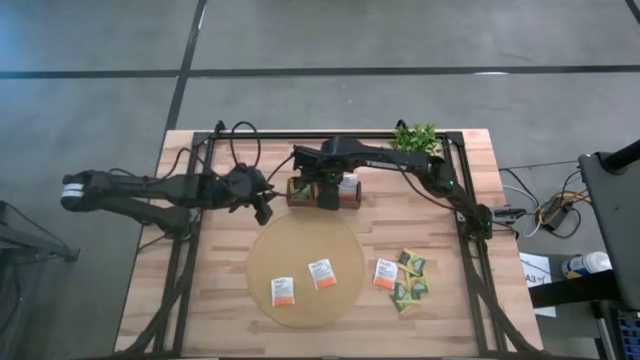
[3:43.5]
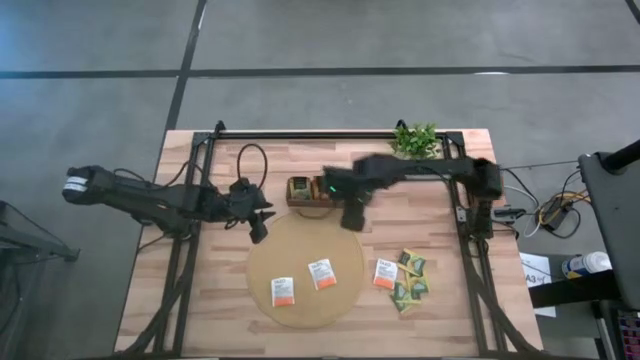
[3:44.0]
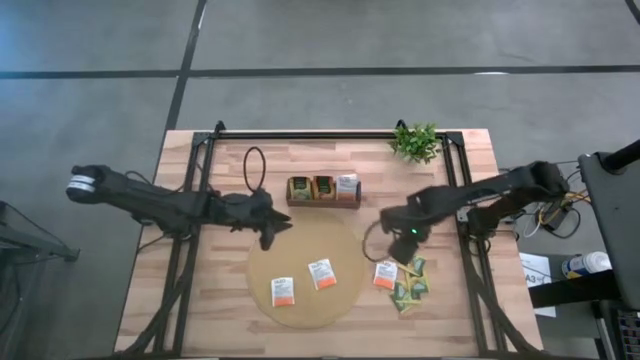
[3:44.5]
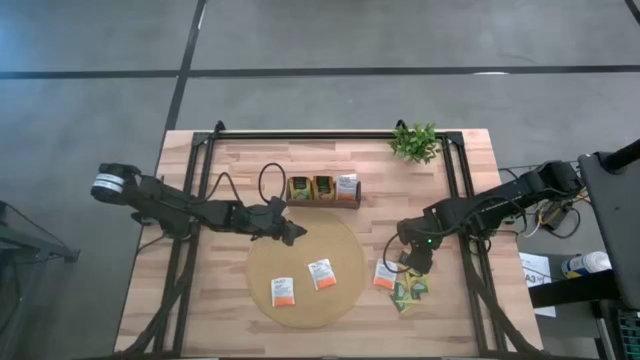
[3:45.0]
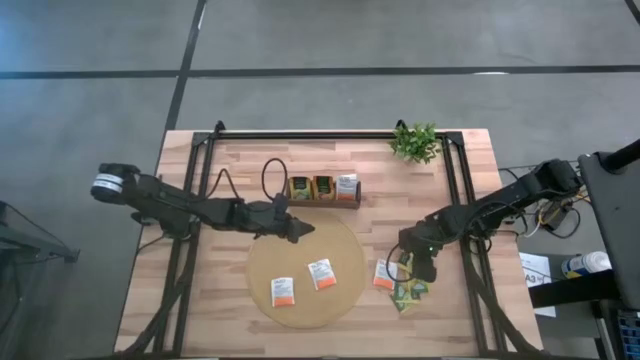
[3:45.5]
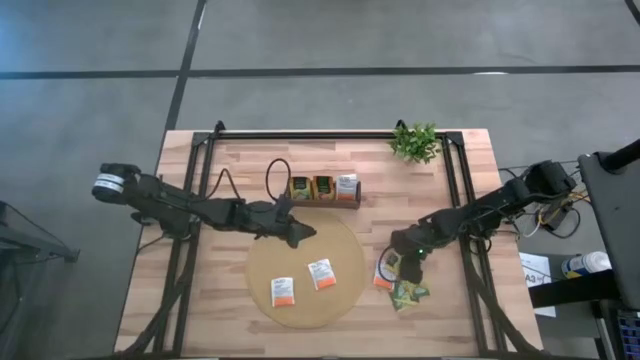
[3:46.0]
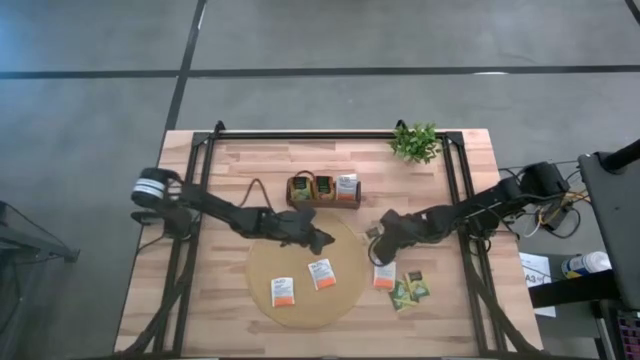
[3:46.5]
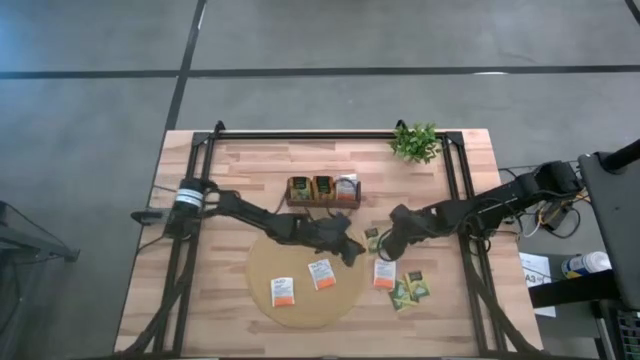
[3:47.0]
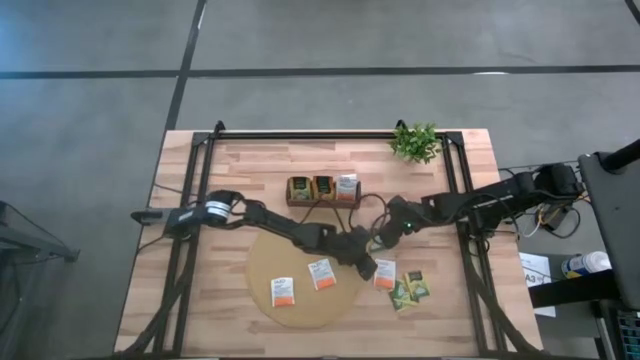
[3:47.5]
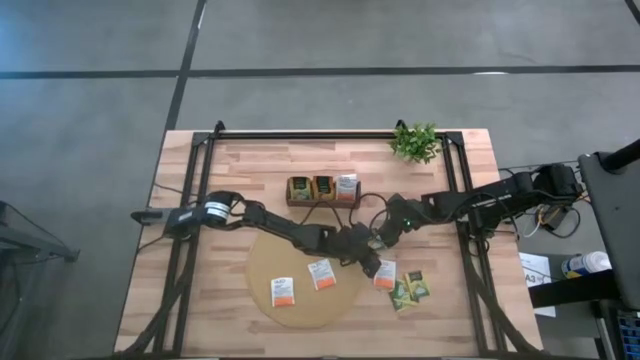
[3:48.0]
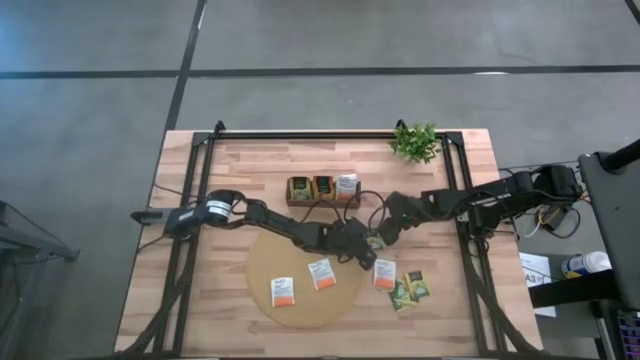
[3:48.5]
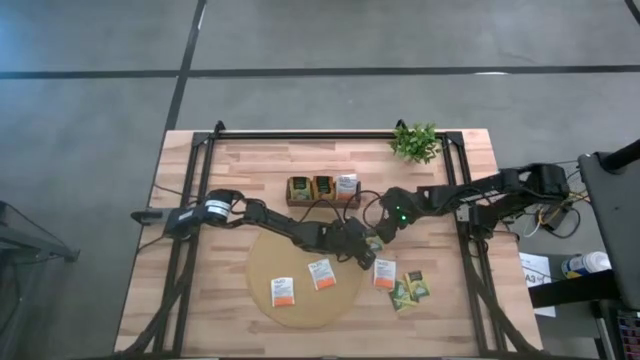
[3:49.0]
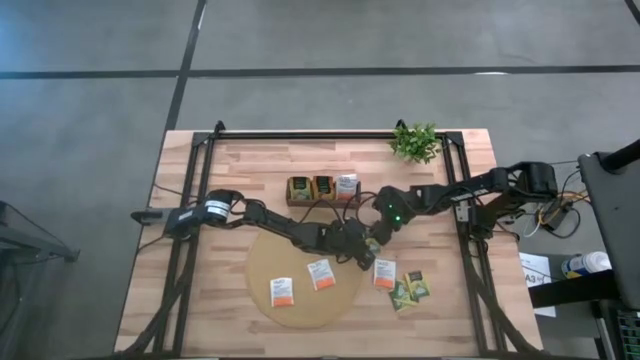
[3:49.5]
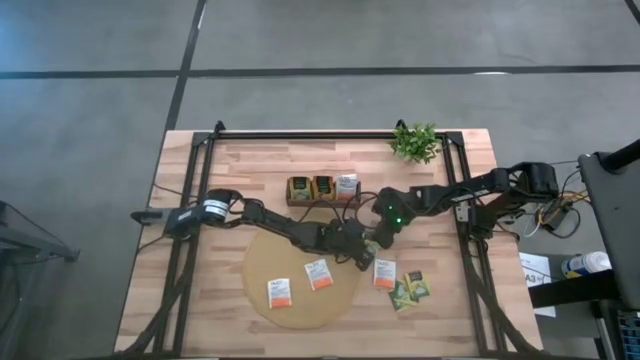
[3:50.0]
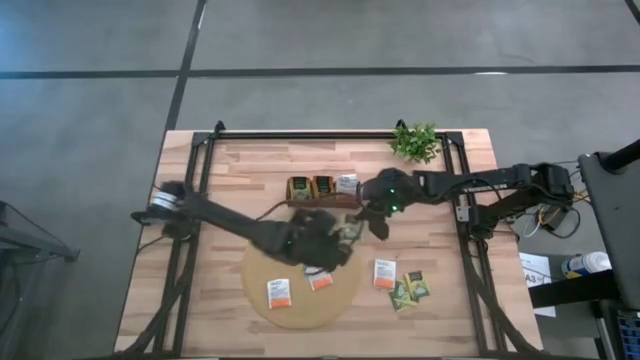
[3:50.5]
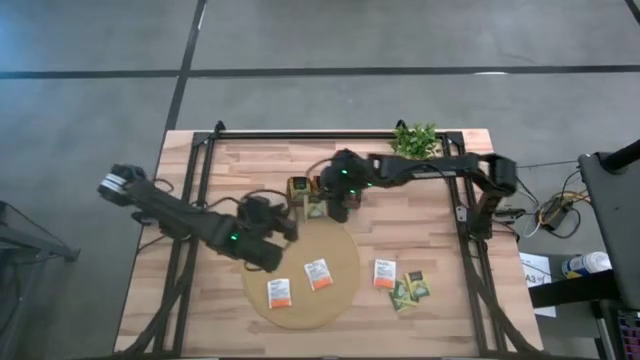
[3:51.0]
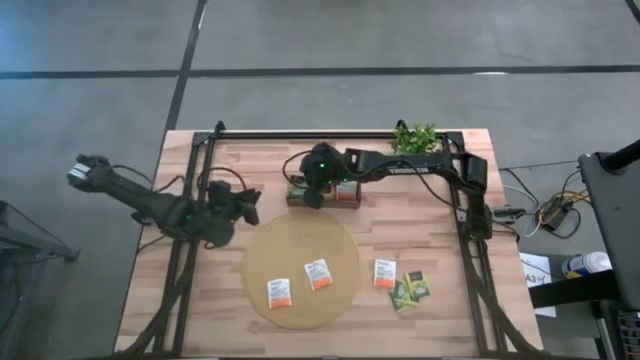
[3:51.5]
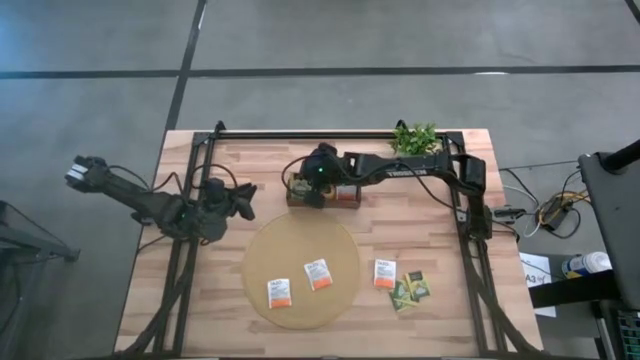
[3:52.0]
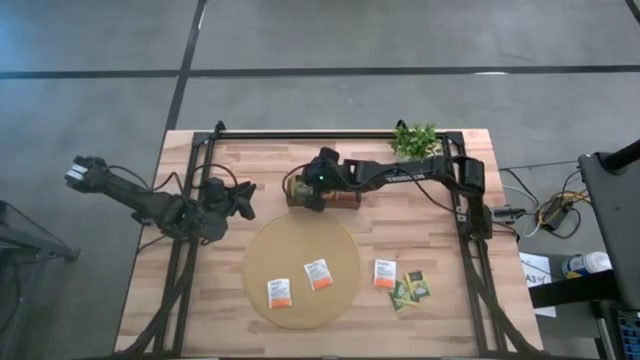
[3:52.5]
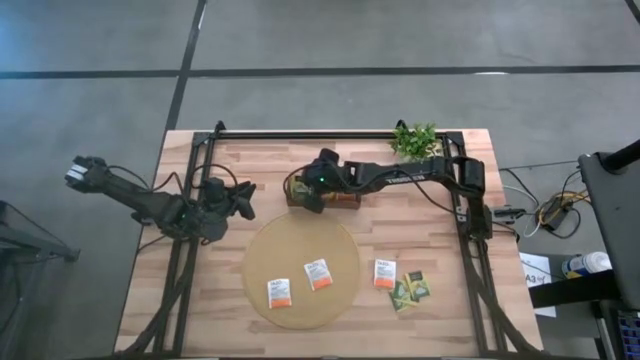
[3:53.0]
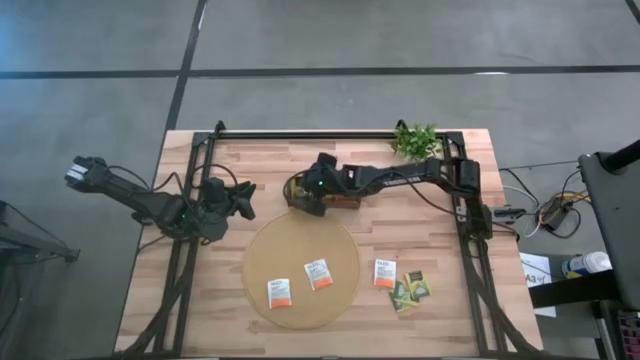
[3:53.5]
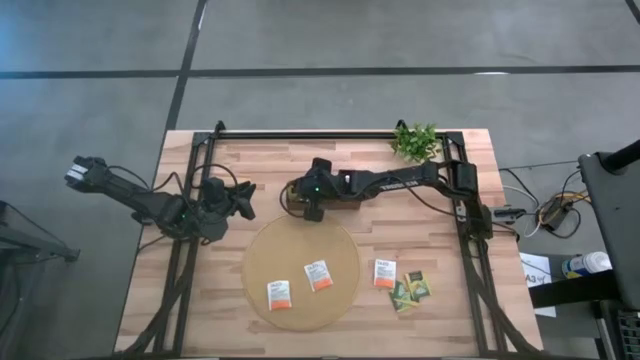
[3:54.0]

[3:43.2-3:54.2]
Task: Pick & Place Tea
Put the green tea bag into the left section of the wooden organizer

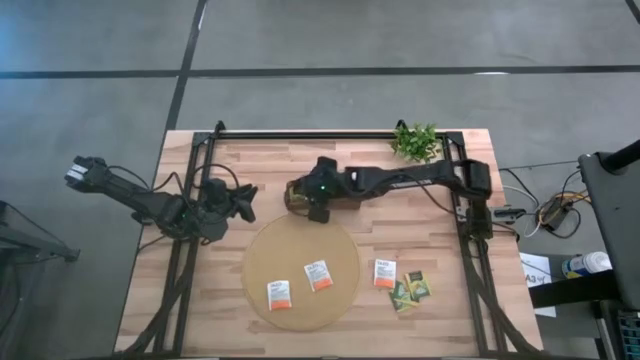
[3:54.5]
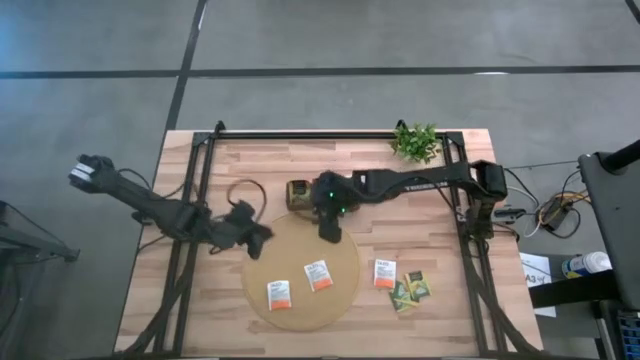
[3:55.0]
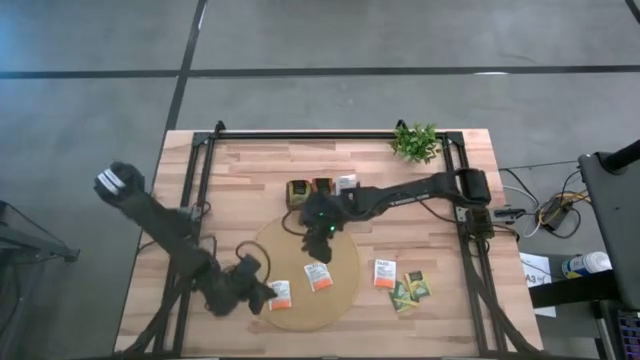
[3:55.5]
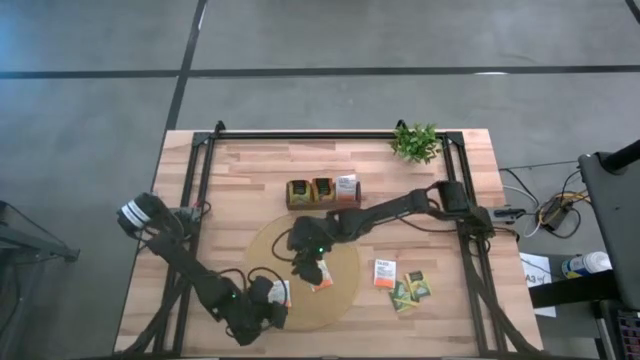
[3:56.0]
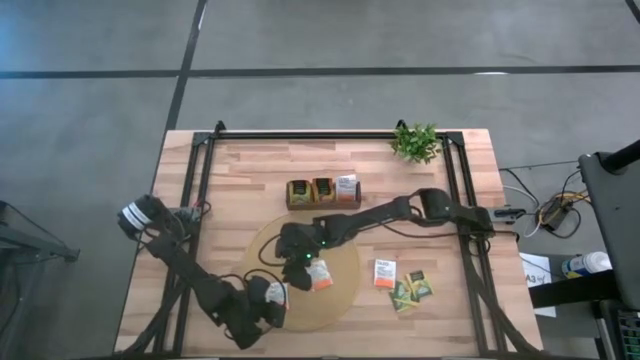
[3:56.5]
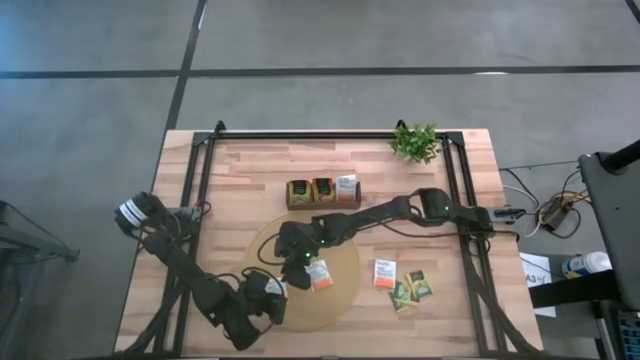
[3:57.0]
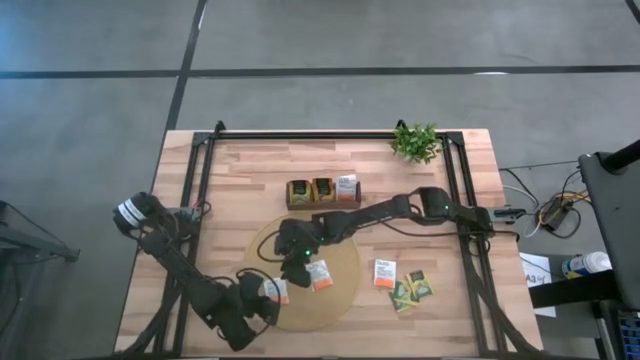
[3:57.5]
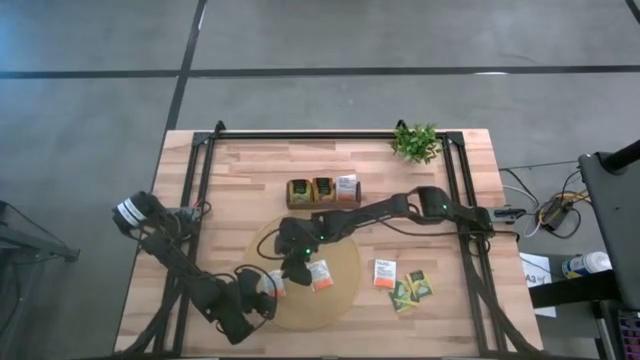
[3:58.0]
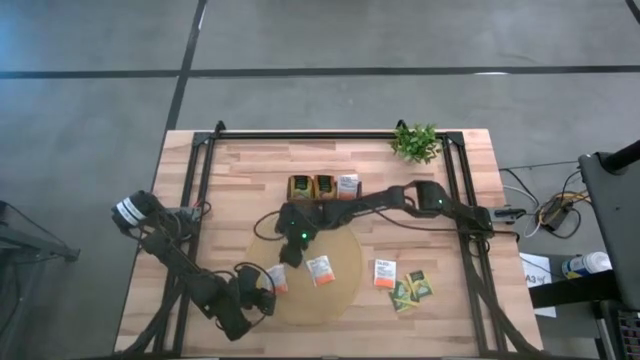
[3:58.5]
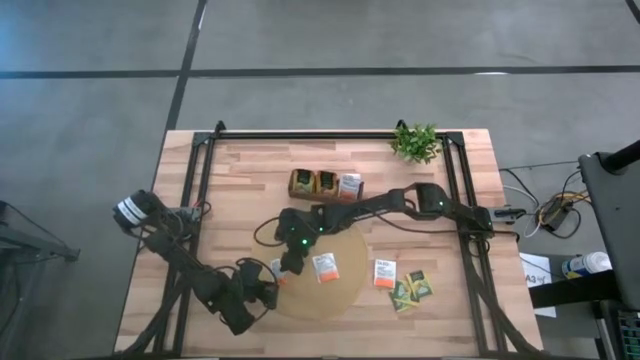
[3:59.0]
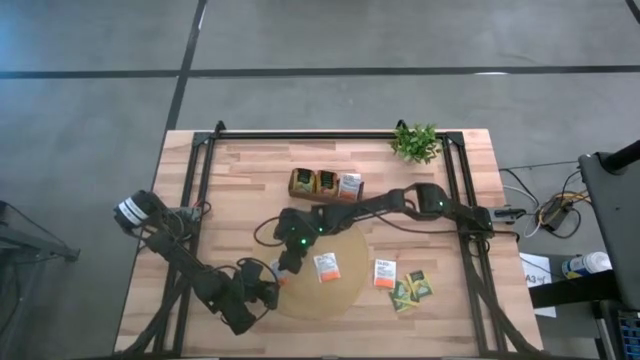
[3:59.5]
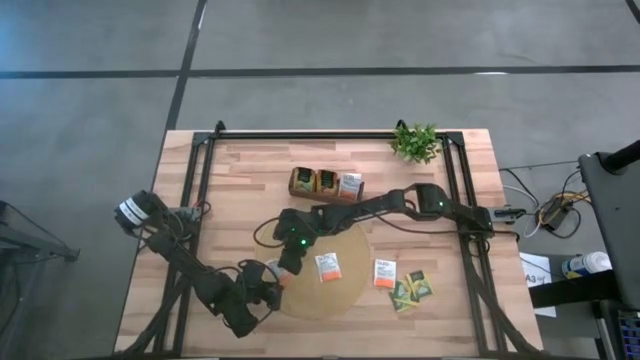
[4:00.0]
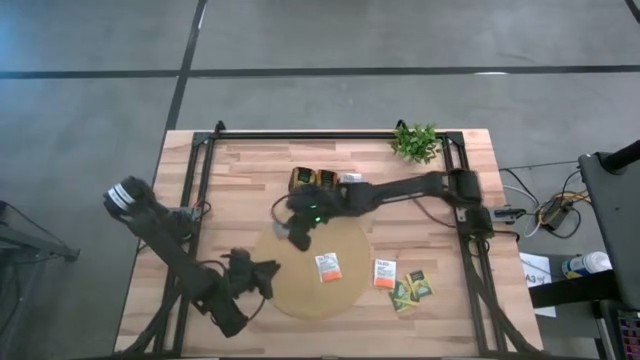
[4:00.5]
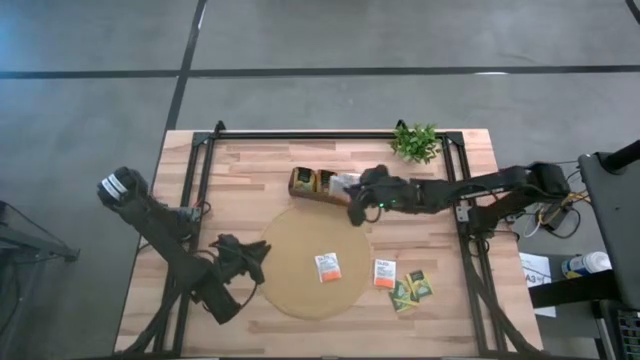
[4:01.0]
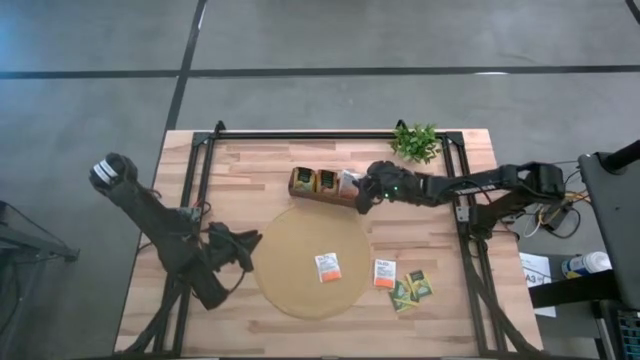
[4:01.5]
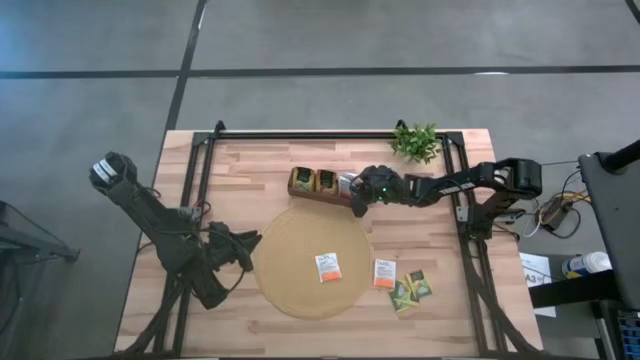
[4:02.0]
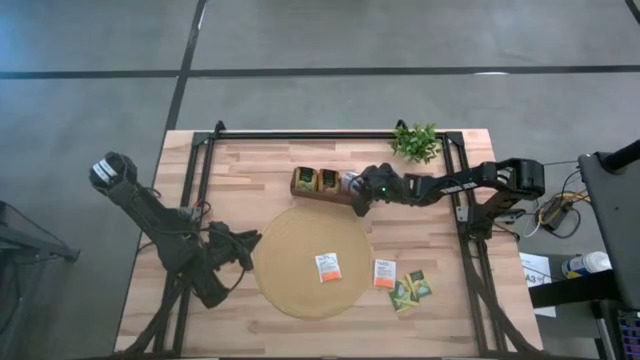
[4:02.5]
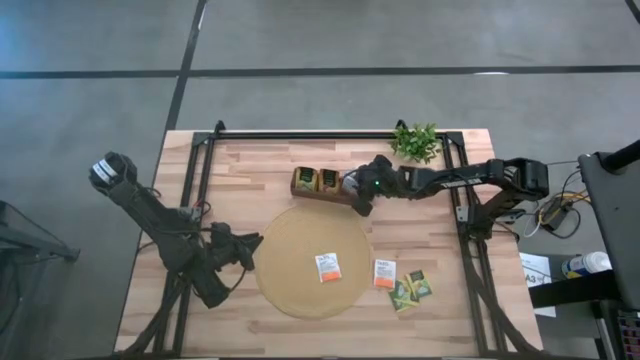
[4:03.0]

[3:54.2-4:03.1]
Put the orange tea bag into the right section of the wooden organizer

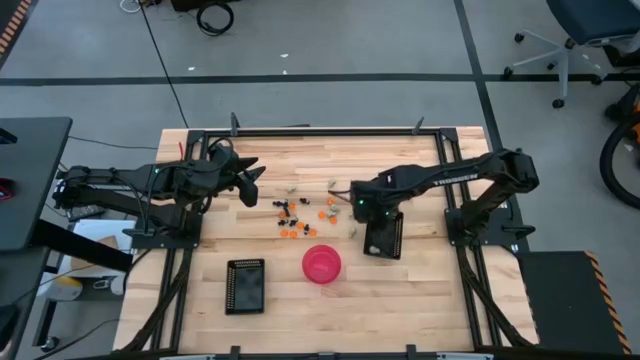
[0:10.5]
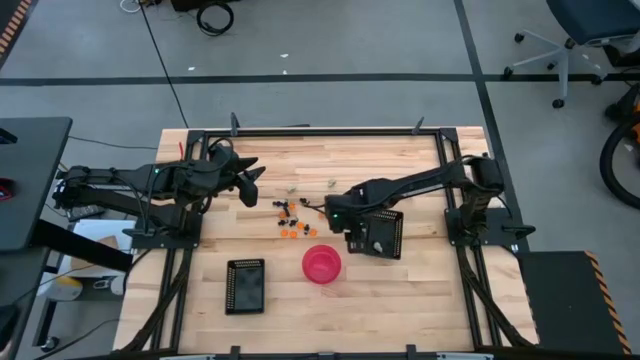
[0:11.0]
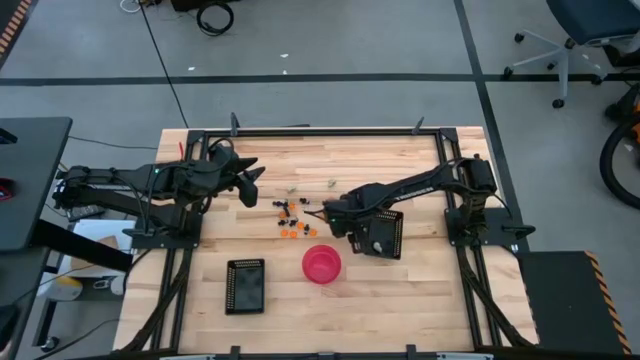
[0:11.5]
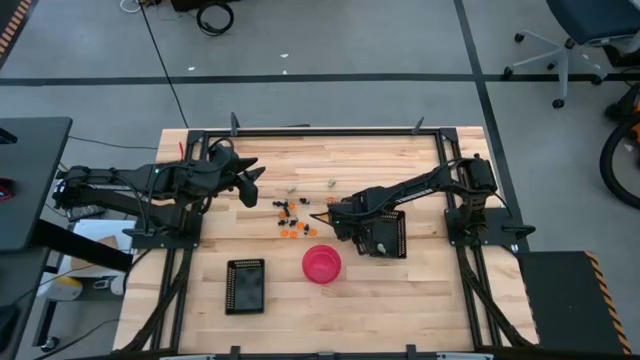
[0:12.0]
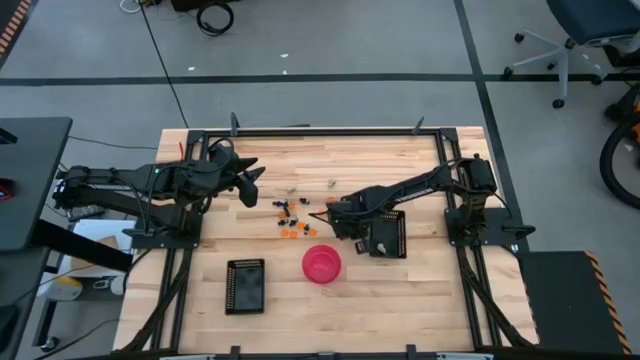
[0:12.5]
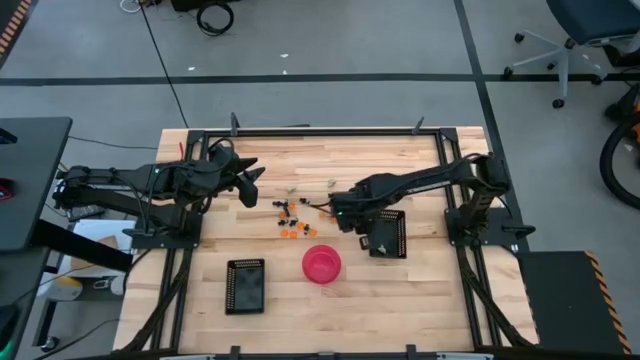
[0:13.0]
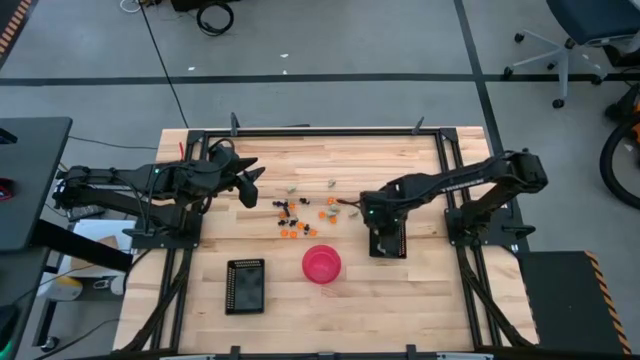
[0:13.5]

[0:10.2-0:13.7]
Task: Sort Halloween decoration
Put the white skull toy into the top black bin
